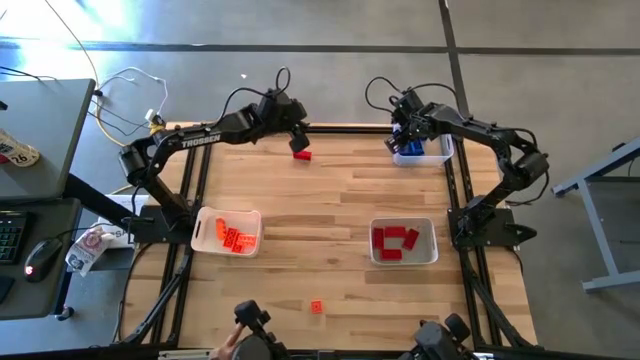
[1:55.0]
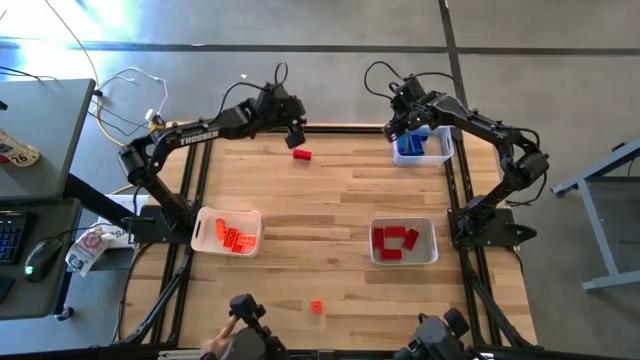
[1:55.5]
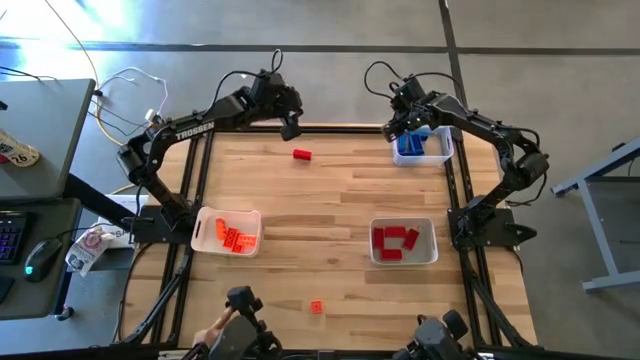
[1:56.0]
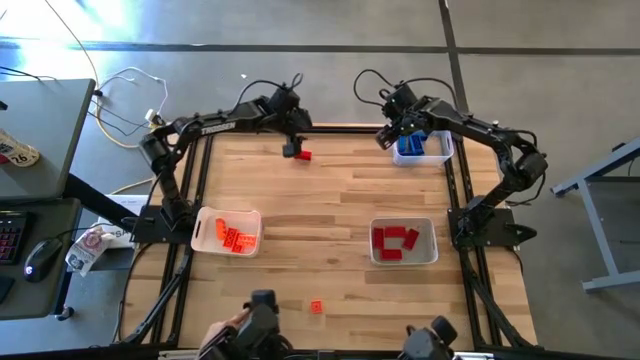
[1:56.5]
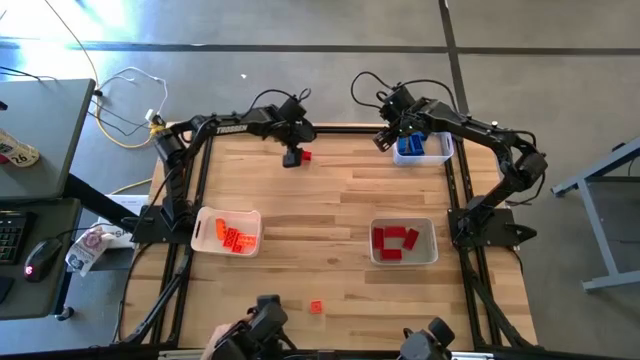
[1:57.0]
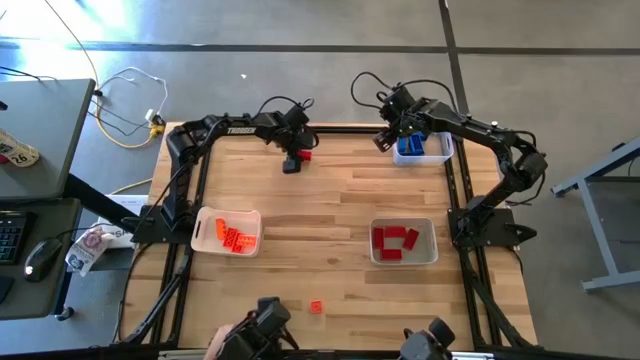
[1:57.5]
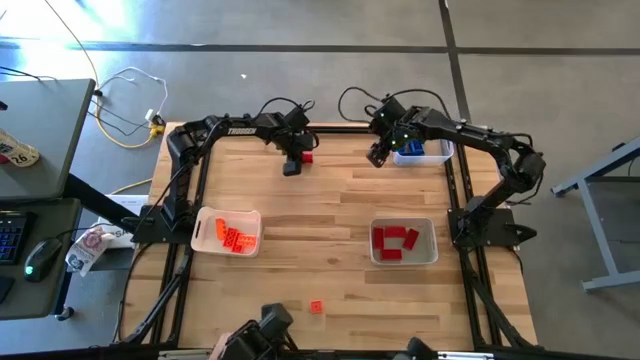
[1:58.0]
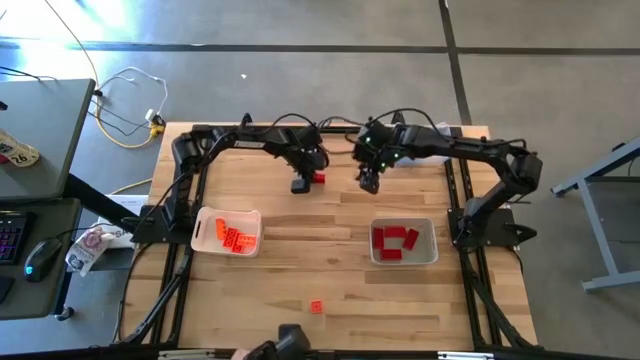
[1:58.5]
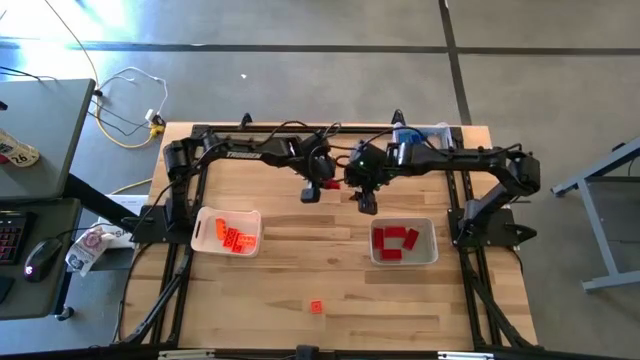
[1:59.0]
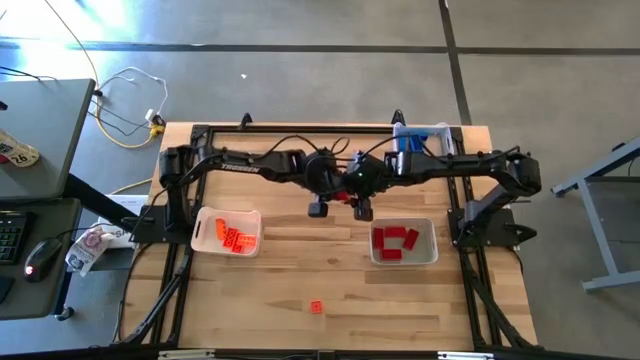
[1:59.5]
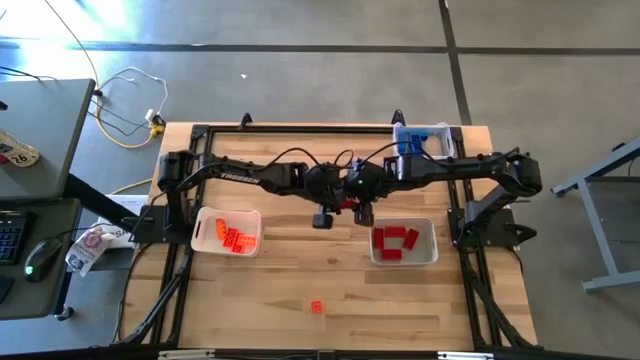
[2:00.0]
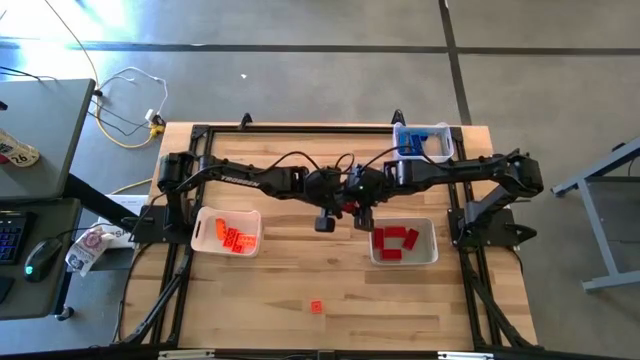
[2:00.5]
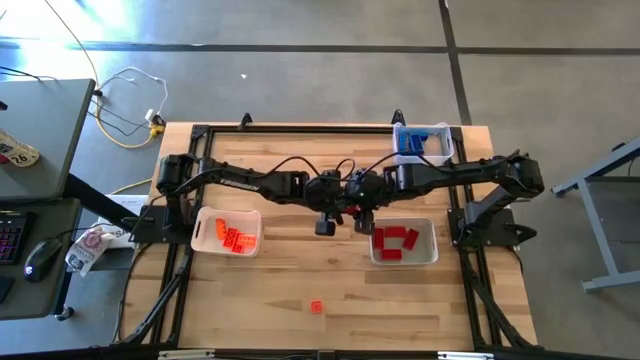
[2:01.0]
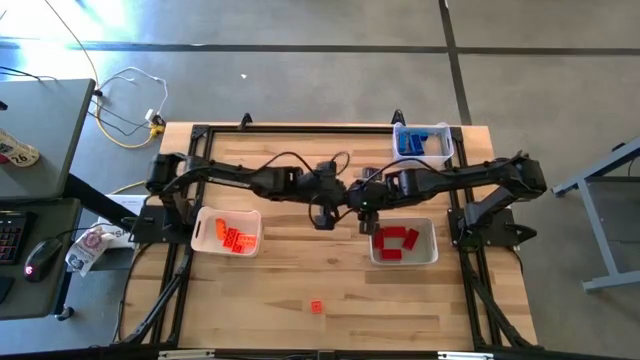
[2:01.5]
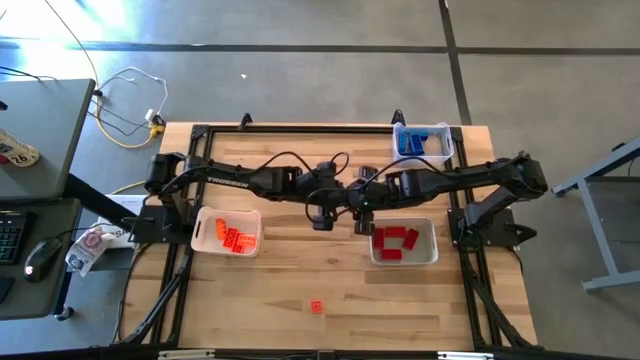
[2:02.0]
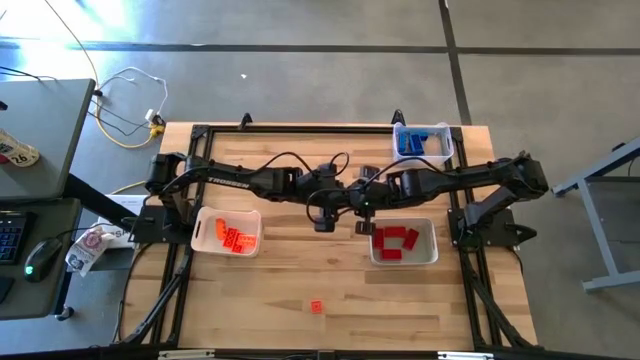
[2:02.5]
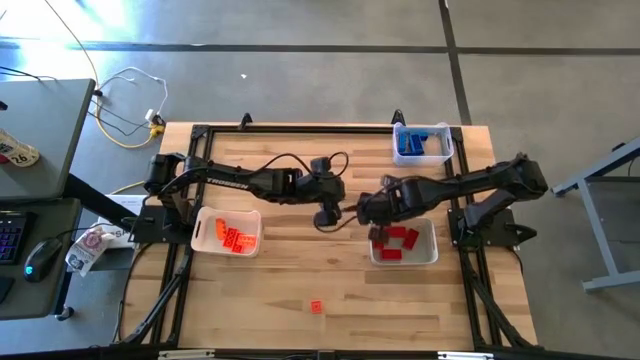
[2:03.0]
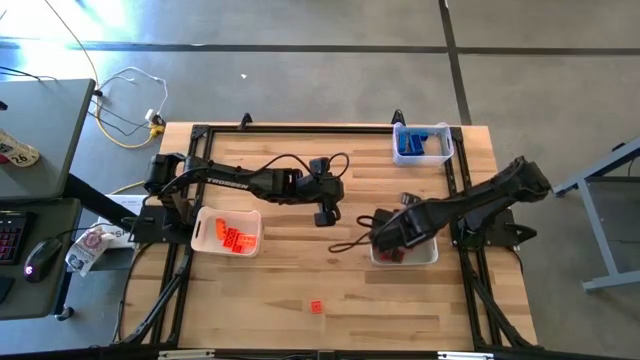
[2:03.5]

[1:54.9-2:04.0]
Task: Sort & place blocks by color
Put the red game piece into the gray bin

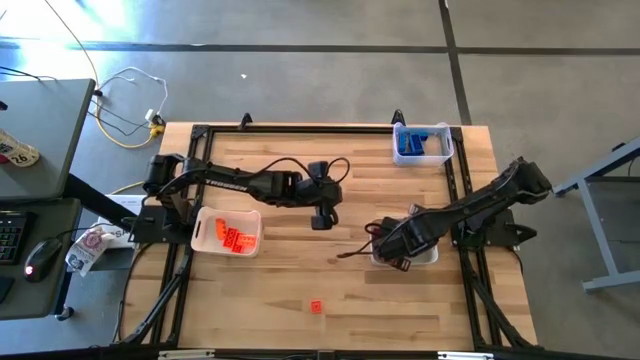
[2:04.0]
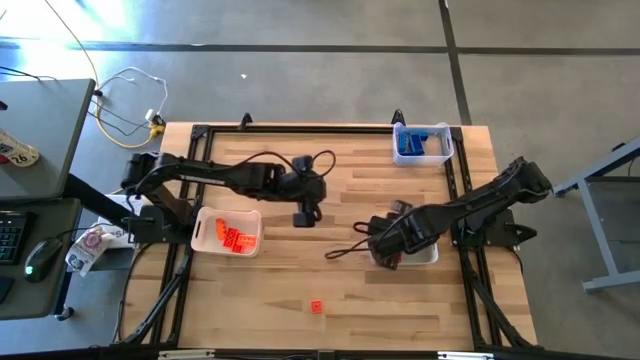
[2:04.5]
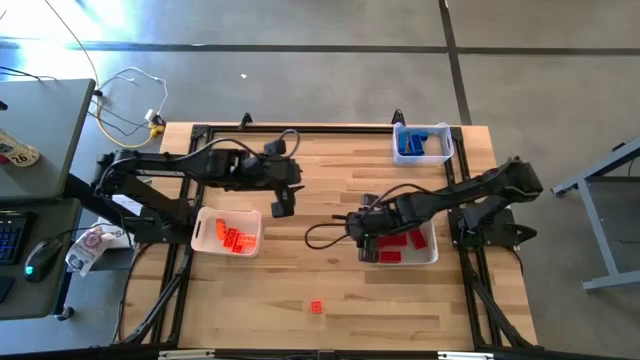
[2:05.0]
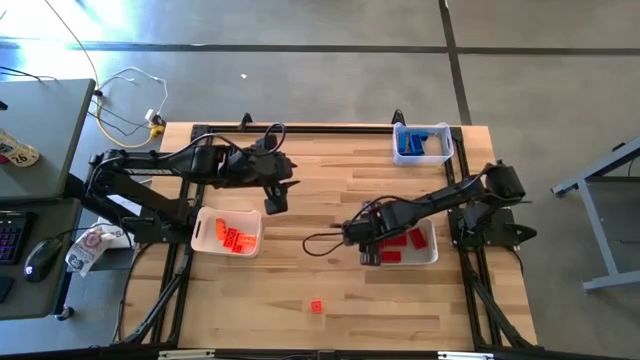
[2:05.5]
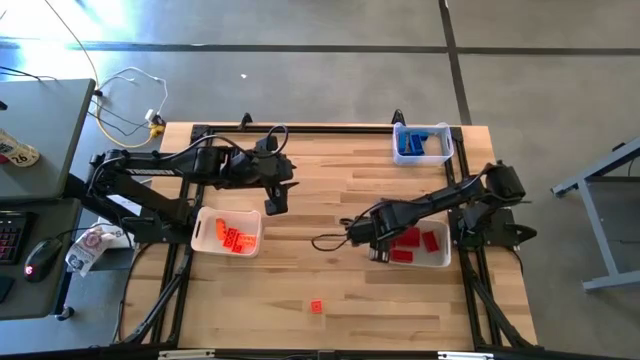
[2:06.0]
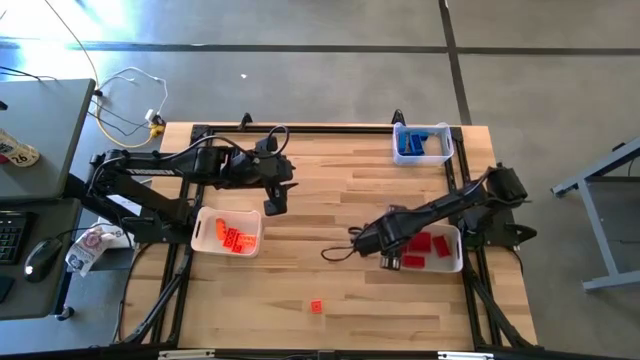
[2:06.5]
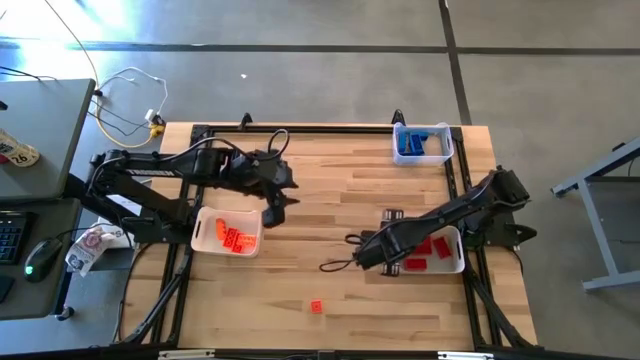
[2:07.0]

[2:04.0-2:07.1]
Adjust the gray bin

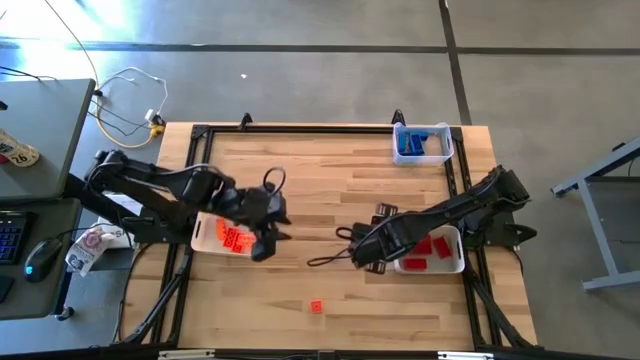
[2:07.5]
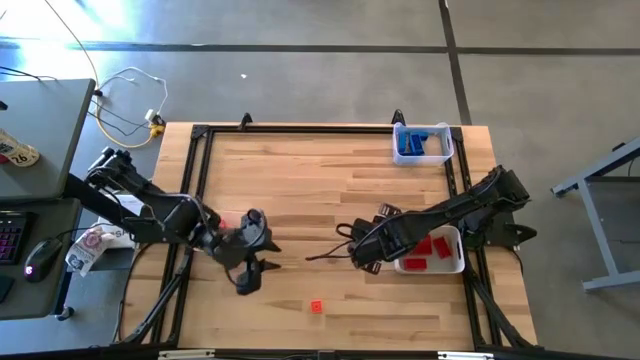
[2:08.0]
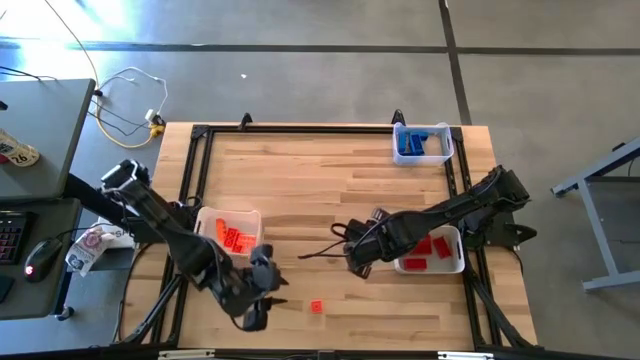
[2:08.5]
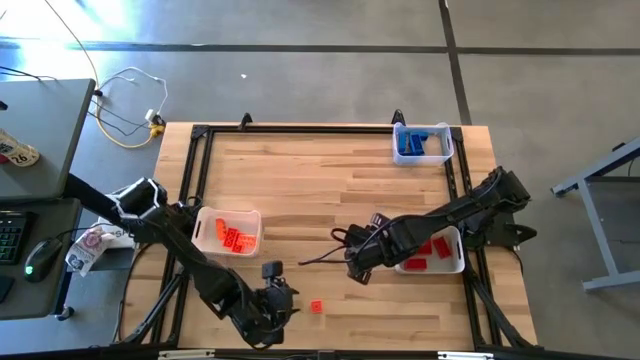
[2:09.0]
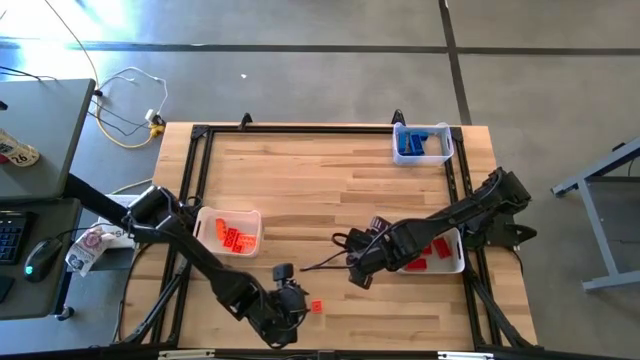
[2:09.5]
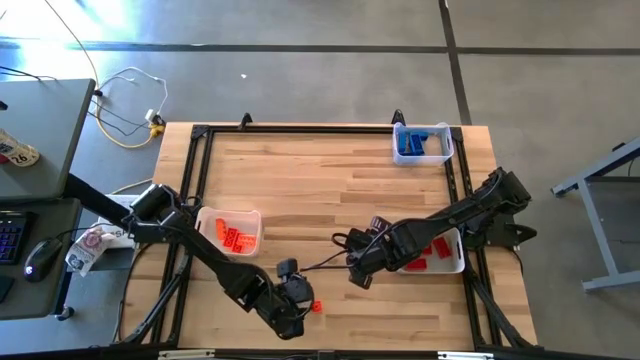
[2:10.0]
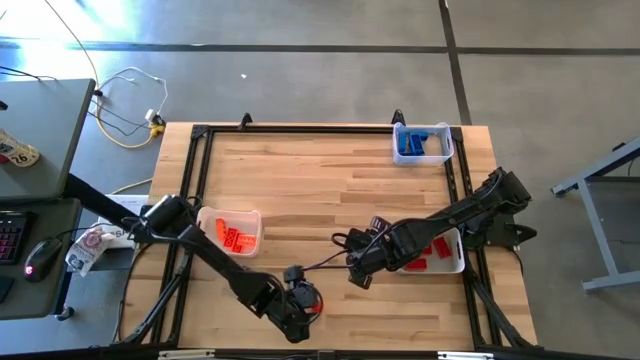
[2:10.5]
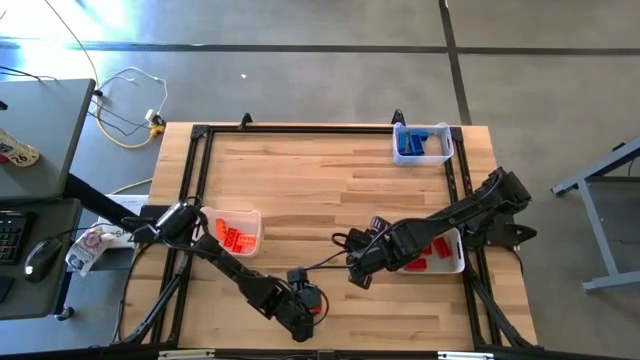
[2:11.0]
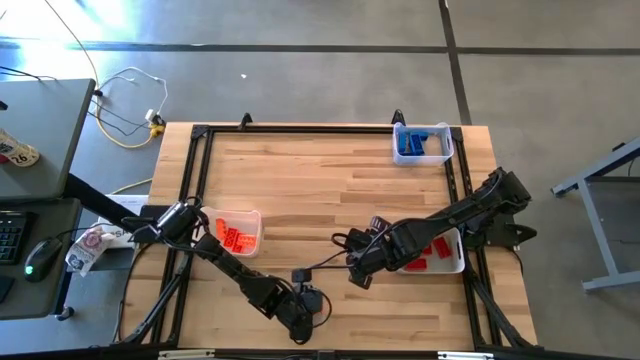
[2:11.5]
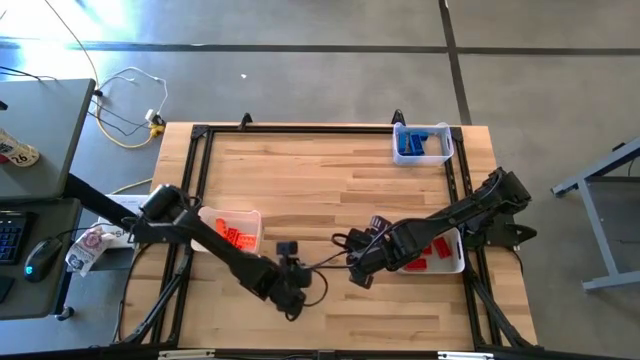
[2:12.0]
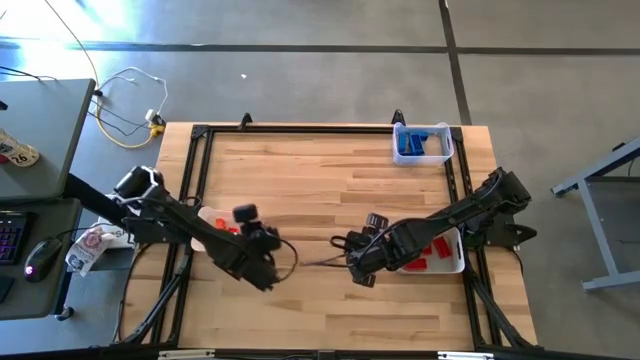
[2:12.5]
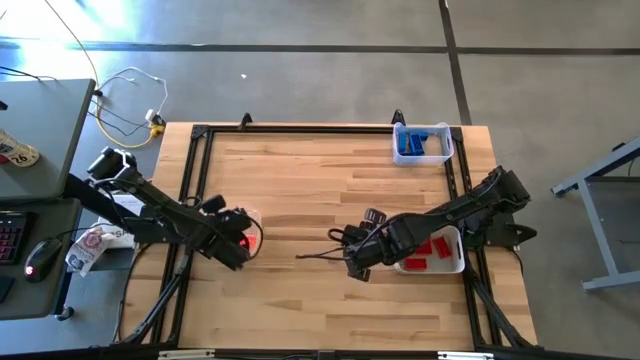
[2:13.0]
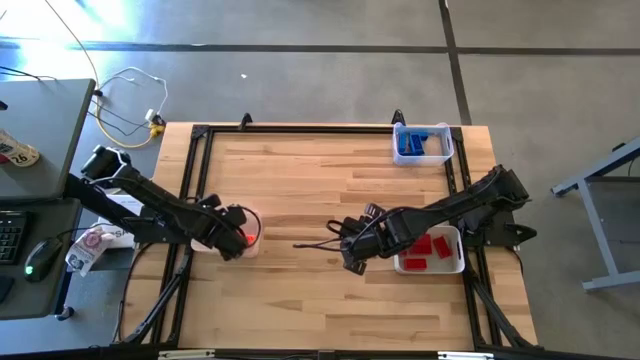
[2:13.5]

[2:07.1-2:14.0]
Put the orange game piece into the white bin

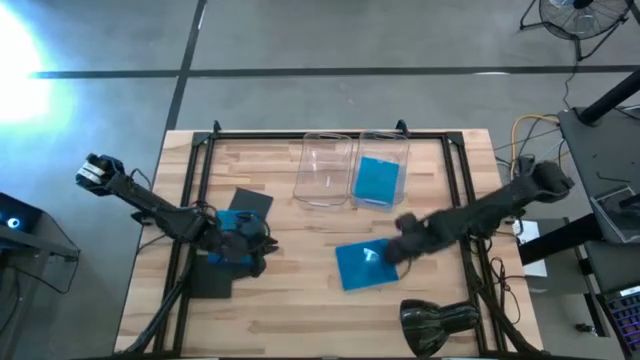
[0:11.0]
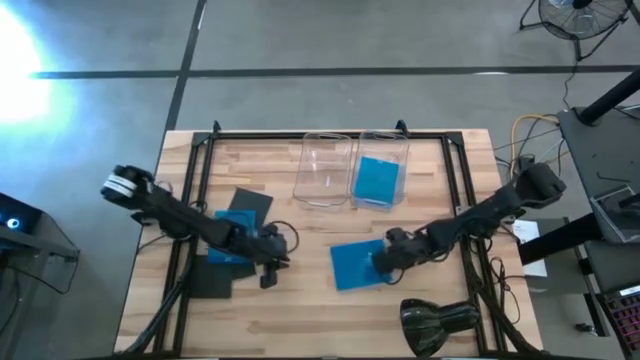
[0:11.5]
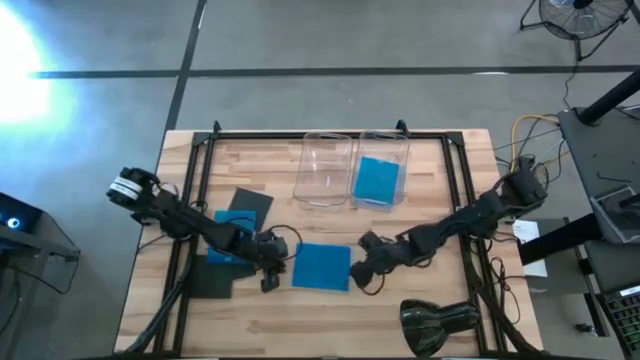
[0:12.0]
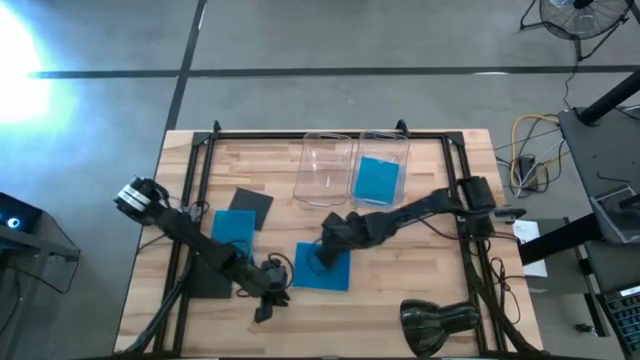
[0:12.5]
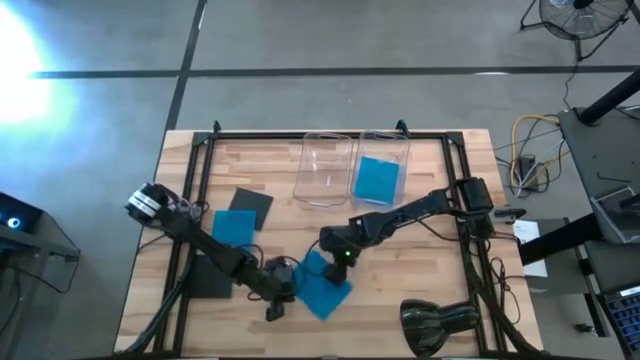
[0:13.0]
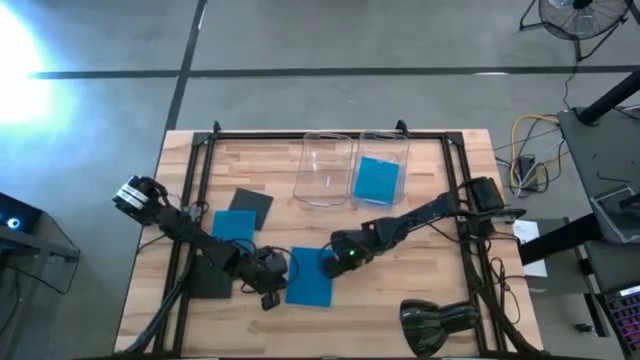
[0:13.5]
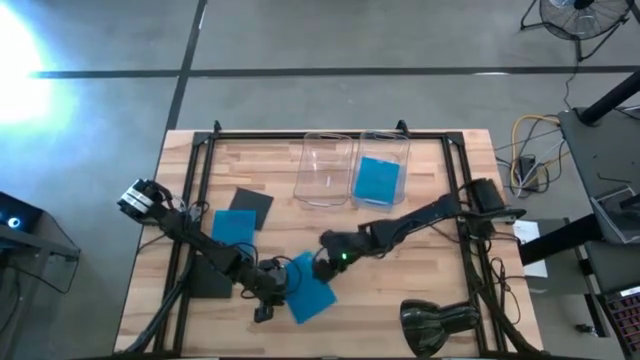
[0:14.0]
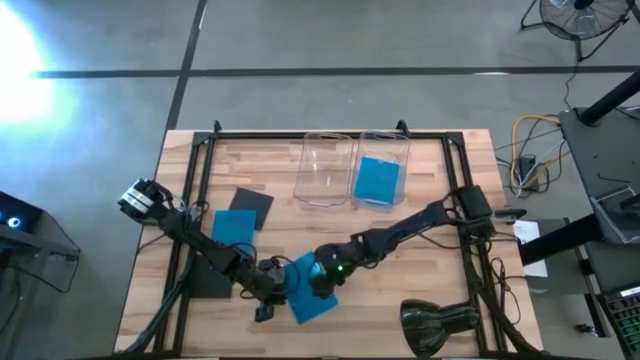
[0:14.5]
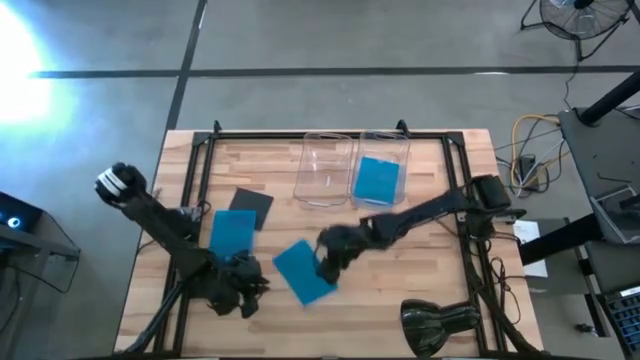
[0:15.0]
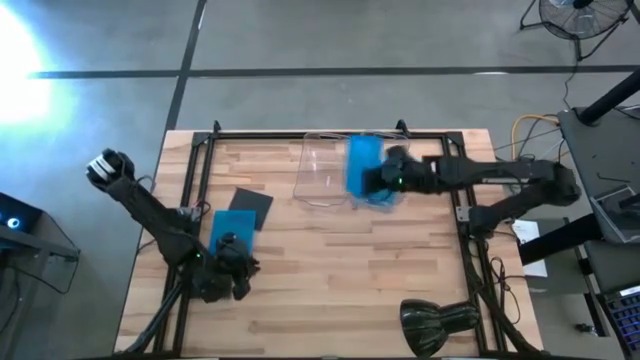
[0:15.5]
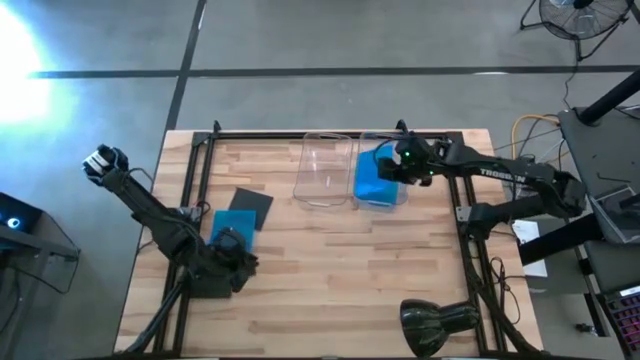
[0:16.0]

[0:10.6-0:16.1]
Task: Pick & place jewel cases by type
Put the right blue CD case into the right transparent bin
